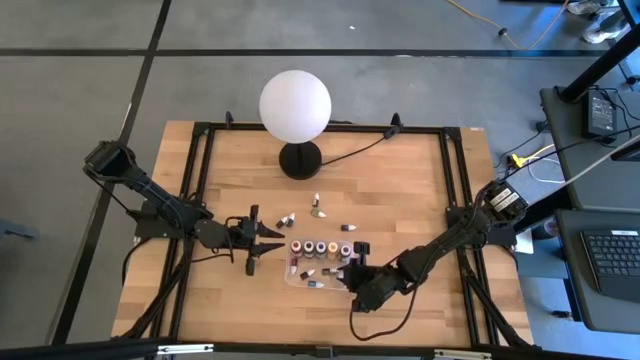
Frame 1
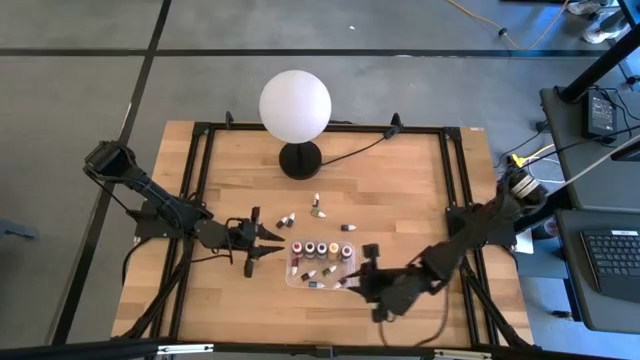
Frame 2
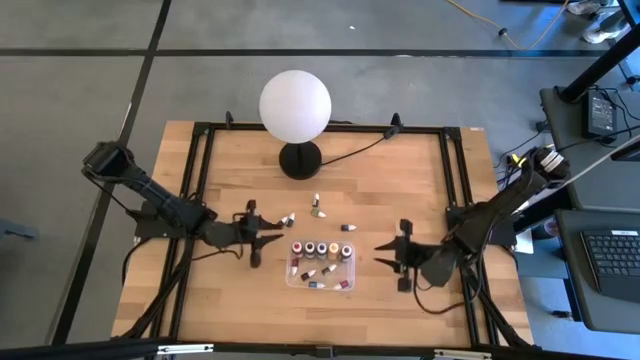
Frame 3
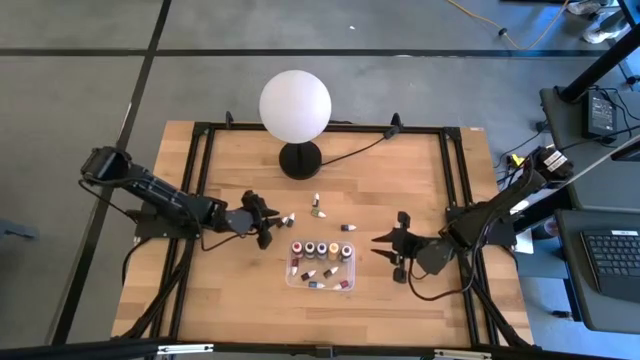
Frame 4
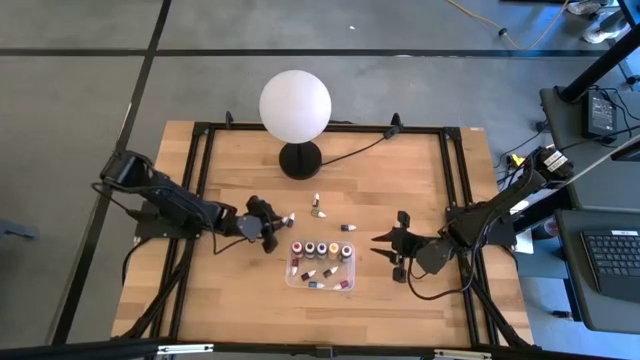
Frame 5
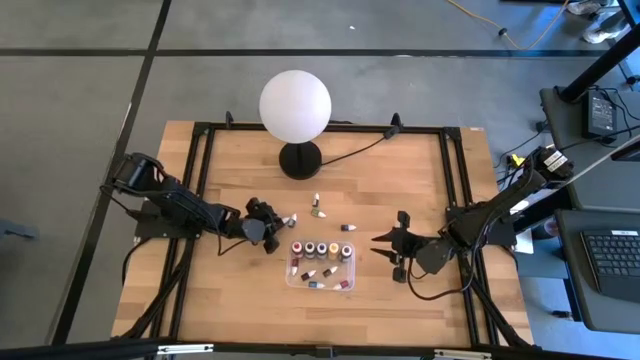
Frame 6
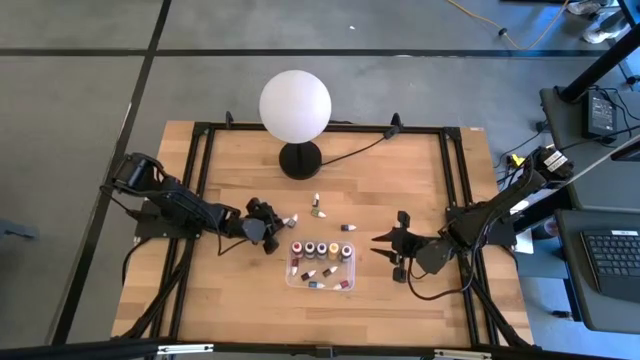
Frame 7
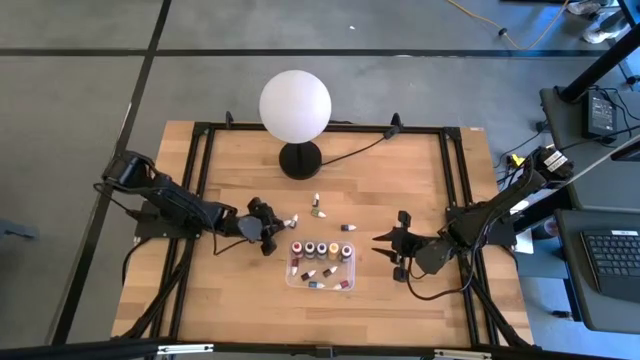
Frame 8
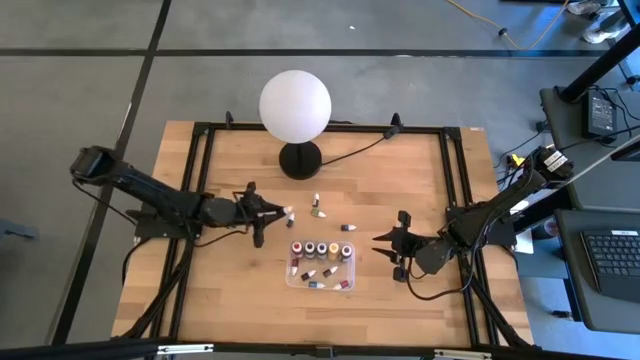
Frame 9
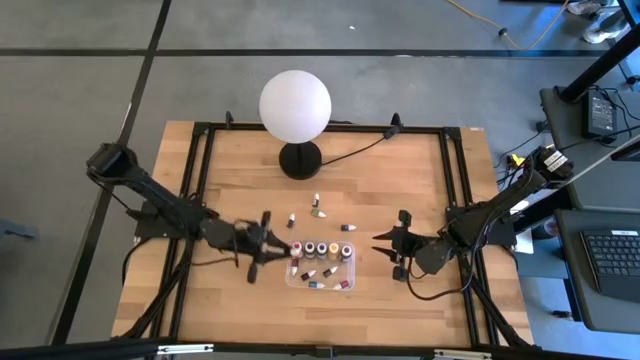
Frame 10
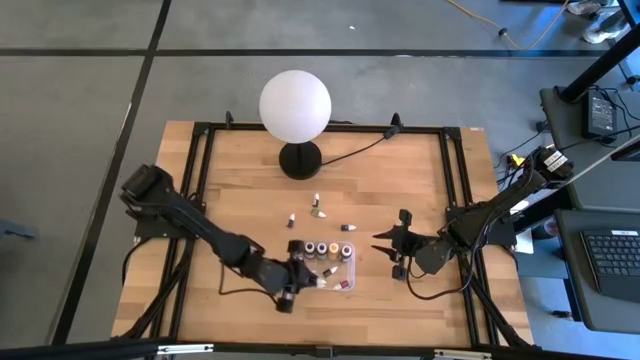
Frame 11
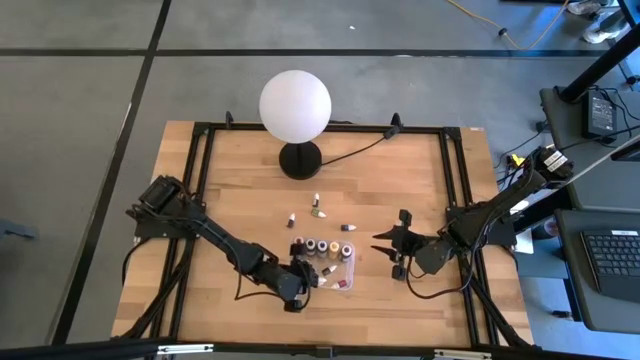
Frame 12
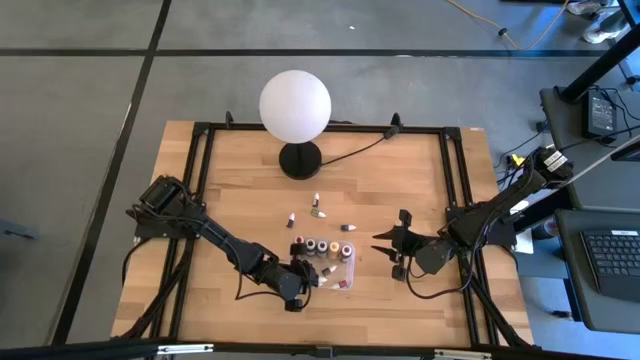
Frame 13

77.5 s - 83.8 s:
Task: Pick & Place food coloring
Put the small brown food coloring bottle into the transparent bin

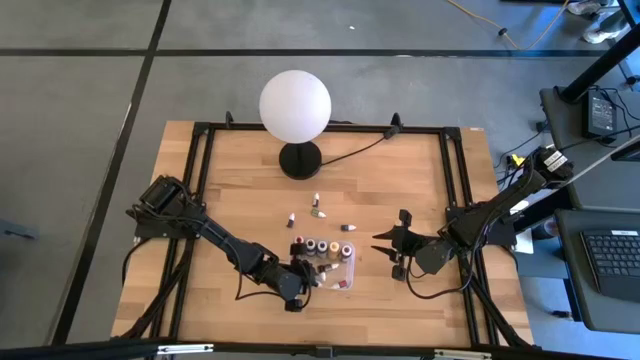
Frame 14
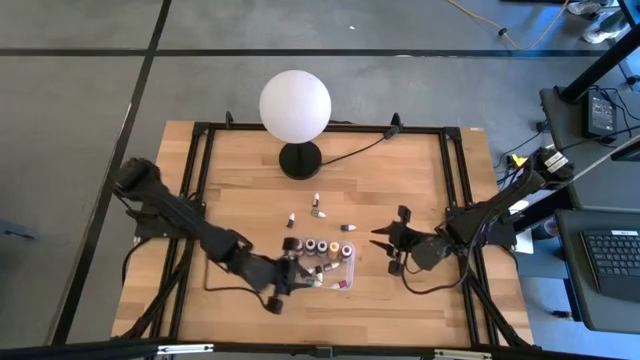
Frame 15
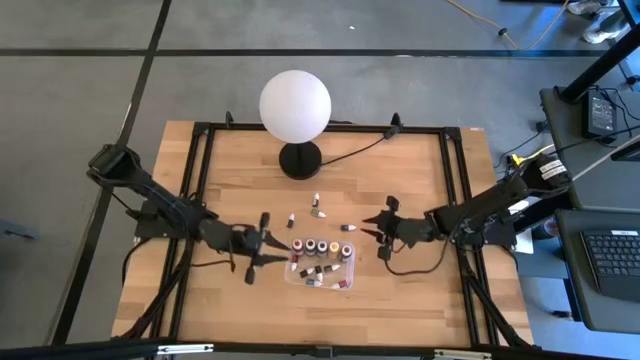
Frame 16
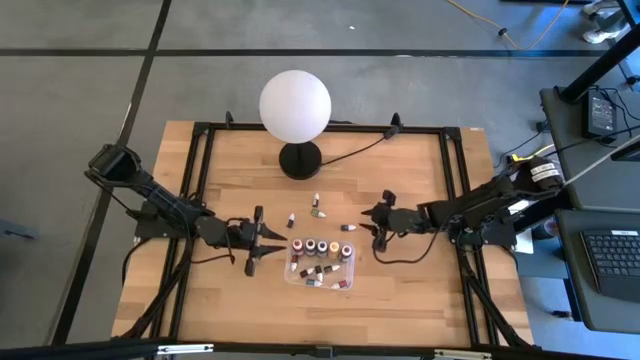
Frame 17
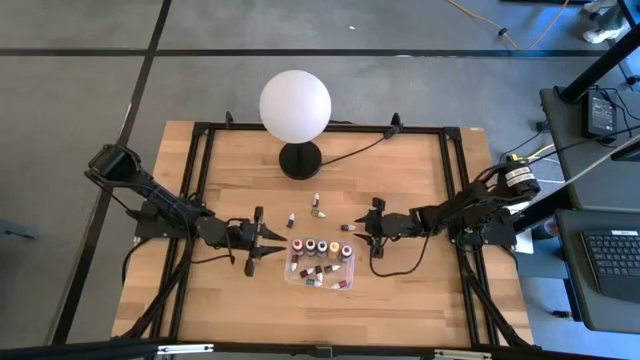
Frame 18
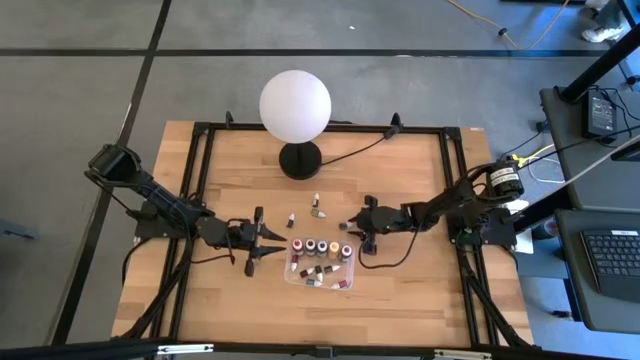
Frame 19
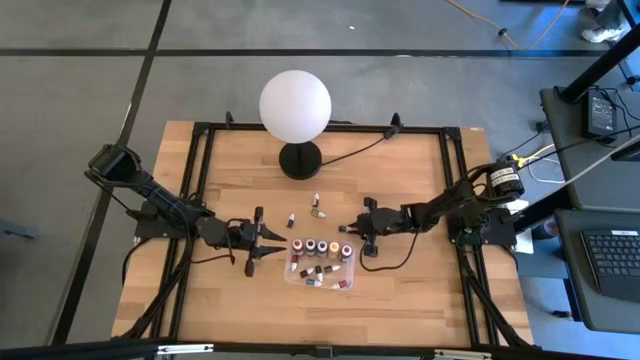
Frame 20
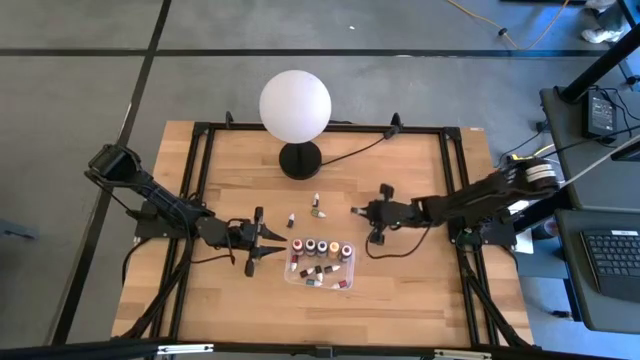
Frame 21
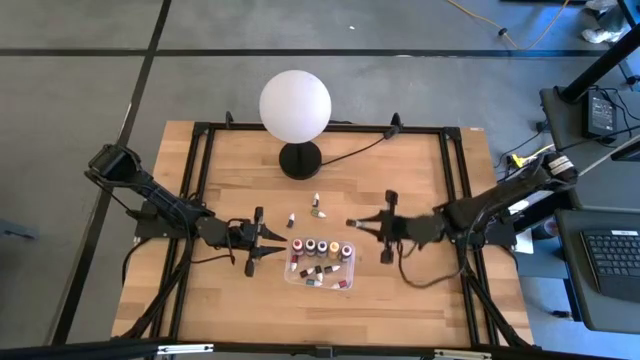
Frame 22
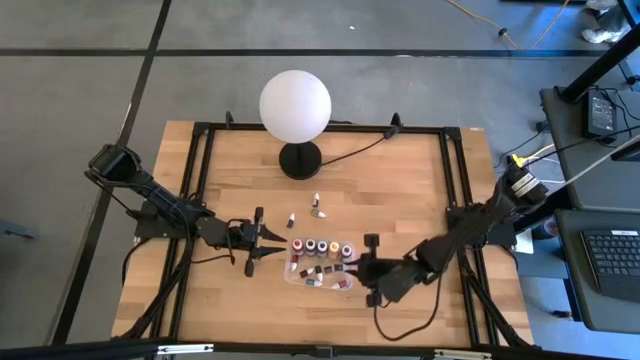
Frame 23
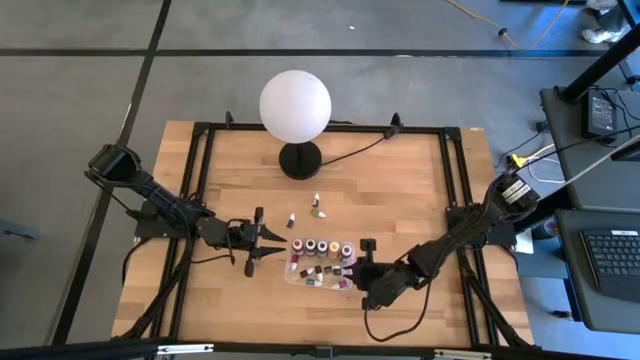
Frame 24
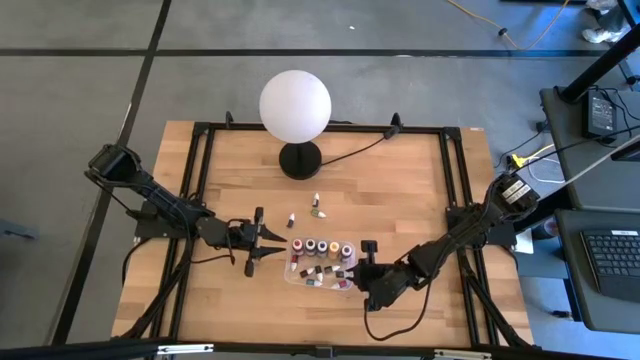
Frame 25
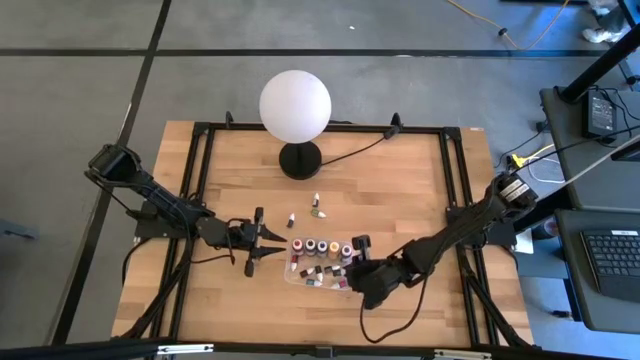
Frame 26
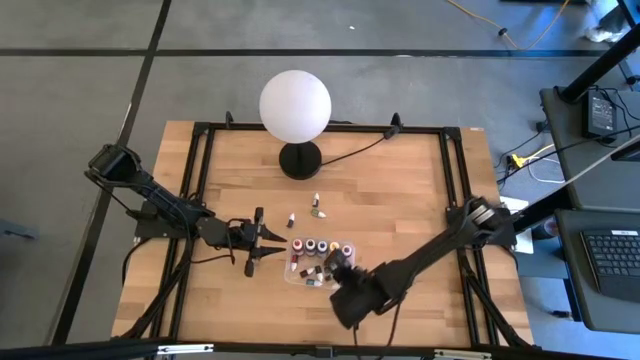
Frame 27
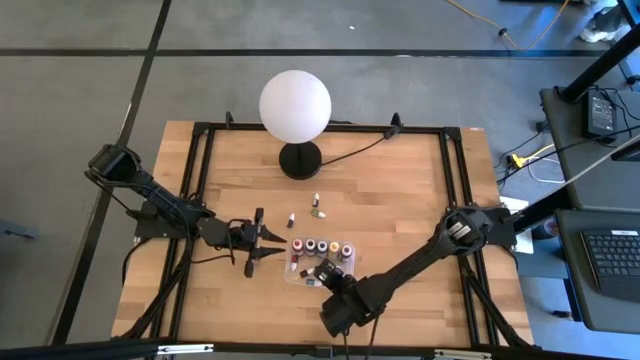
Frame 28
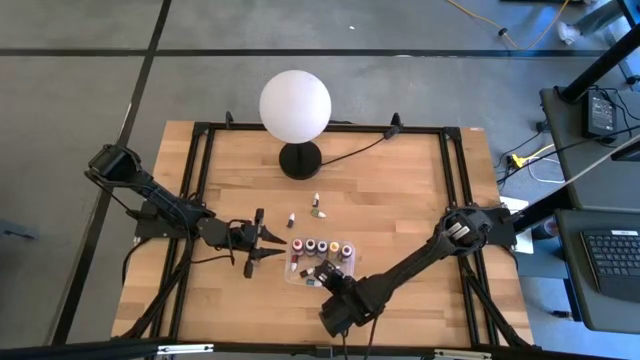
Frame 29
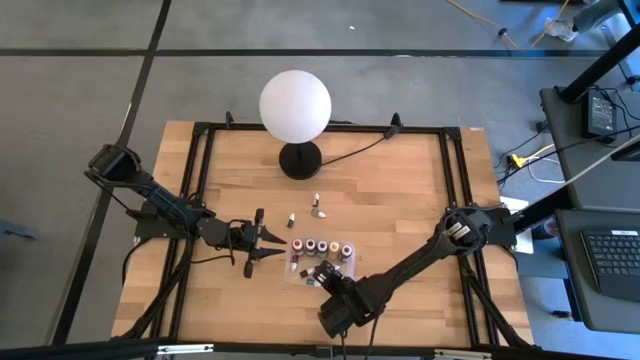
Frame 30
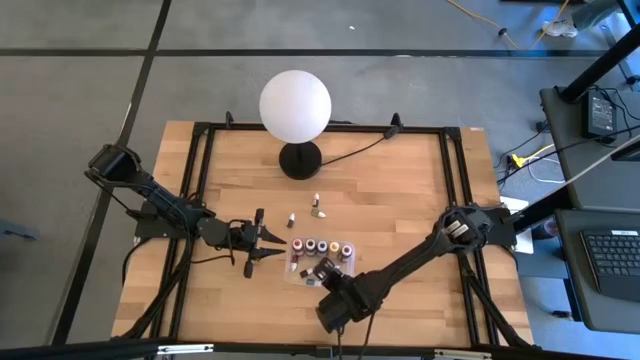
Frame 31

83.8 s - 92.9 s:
Put the small blue food coloring bottle into the transparent bin

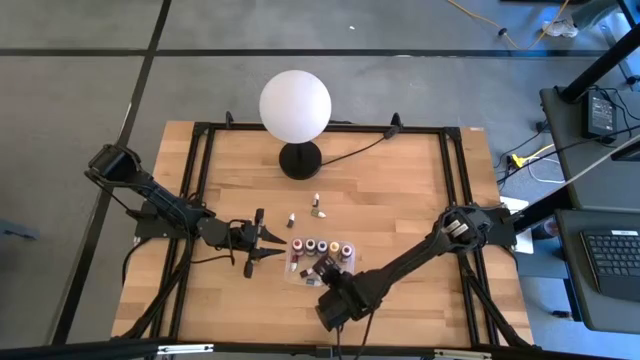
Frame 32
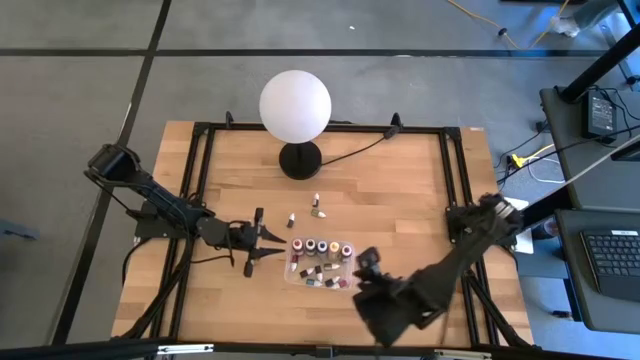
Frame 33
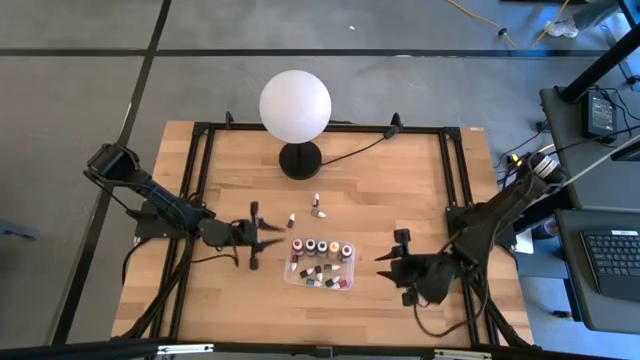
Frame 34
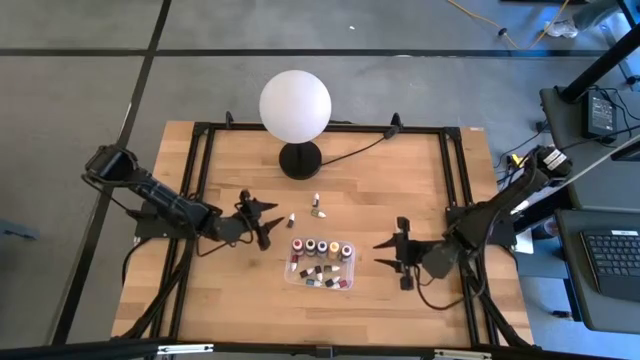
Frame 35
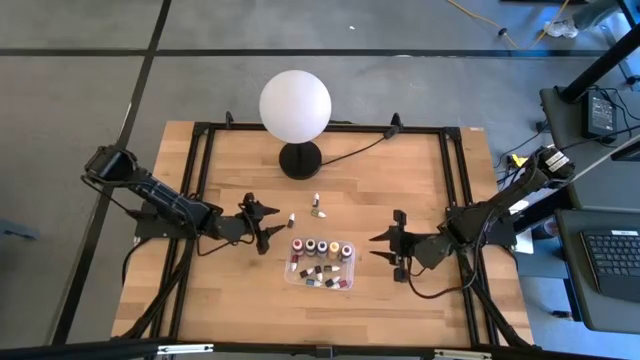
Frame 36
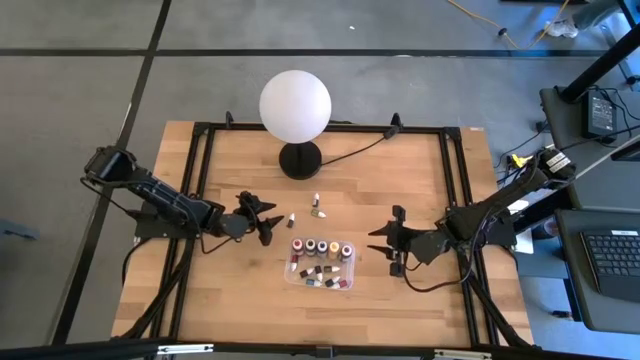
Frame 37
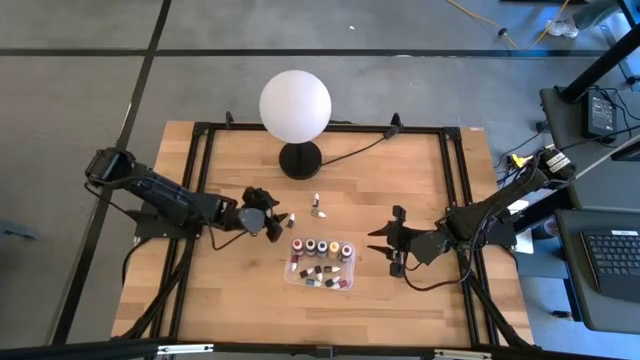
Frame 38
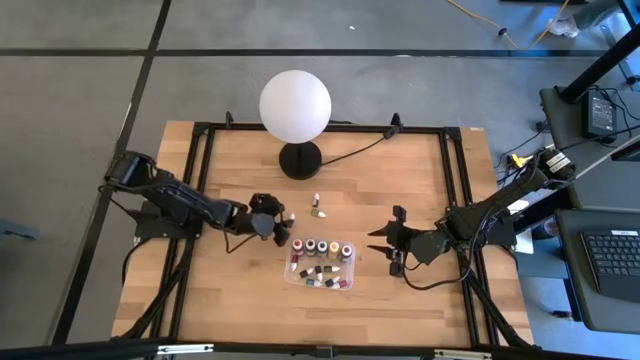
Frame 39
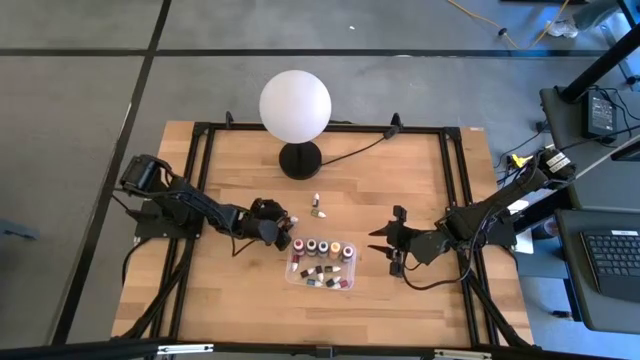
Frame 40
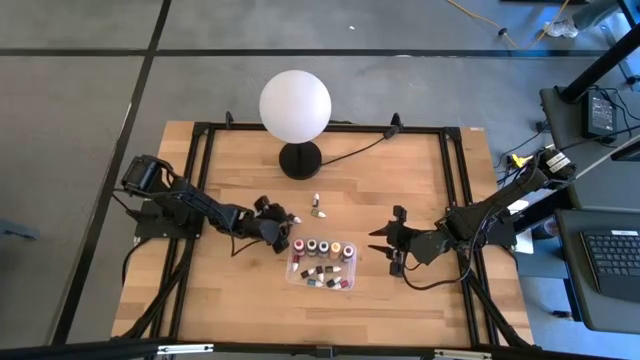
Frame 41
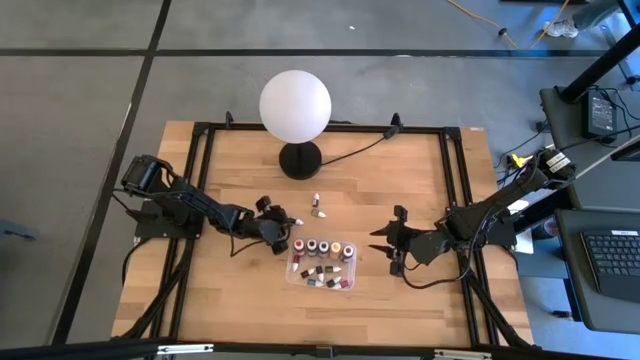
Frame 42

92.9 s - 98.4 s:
Put the small violet food coloring bottle into the transparent bin

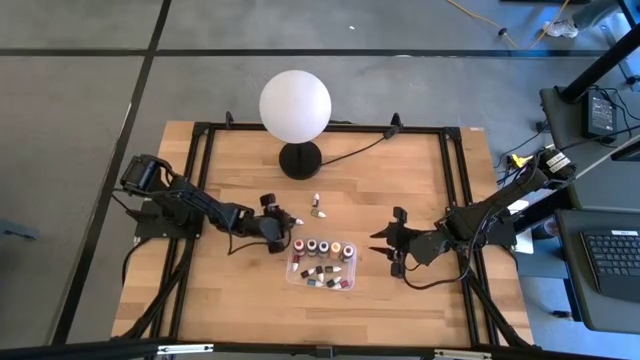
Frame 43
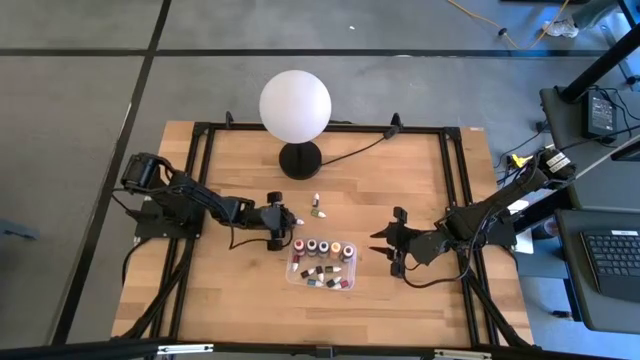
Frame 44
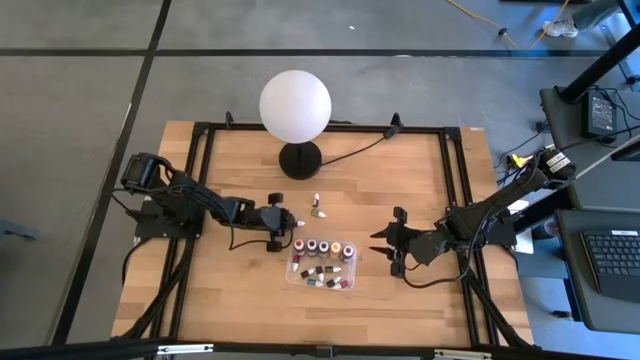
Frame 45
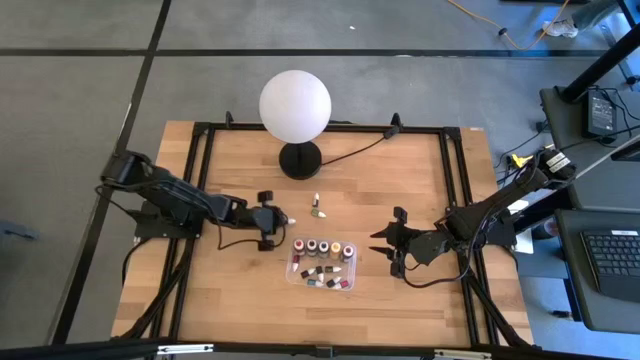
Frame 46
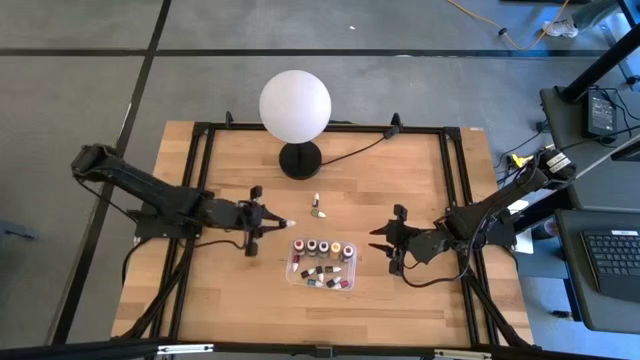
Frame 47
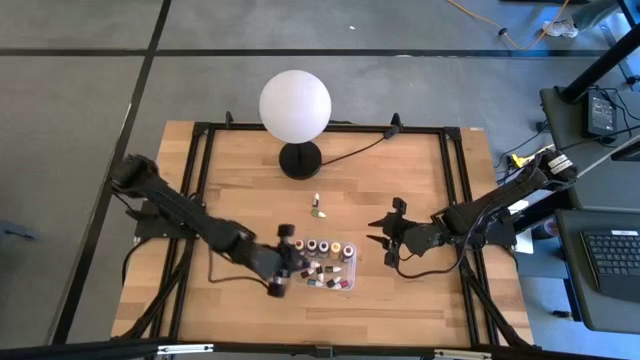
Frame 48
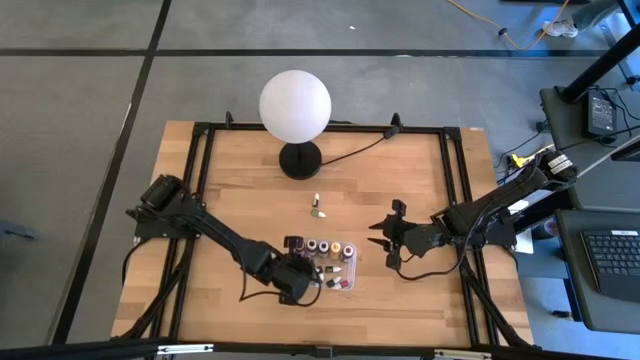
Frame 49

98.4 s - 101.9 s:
Put the small violet food coloring bottle into the transparent bin
